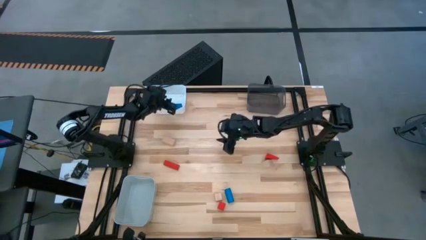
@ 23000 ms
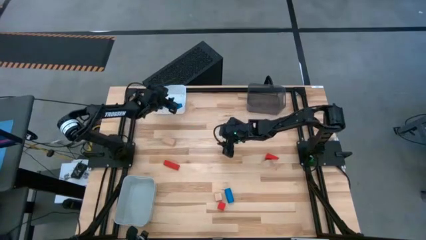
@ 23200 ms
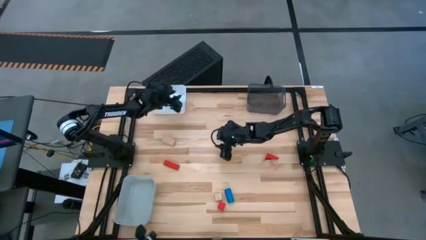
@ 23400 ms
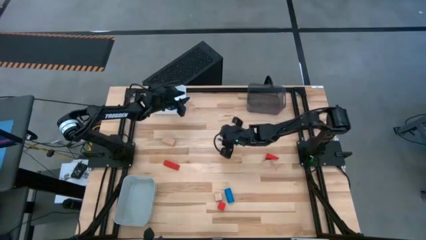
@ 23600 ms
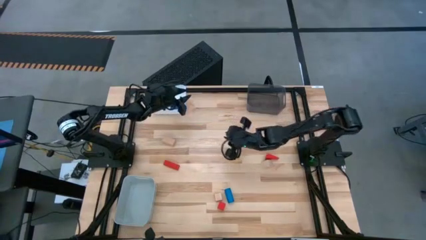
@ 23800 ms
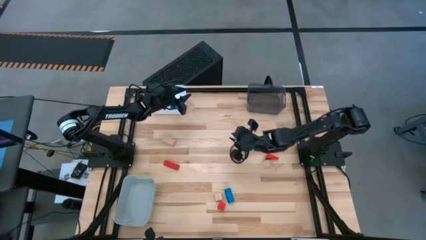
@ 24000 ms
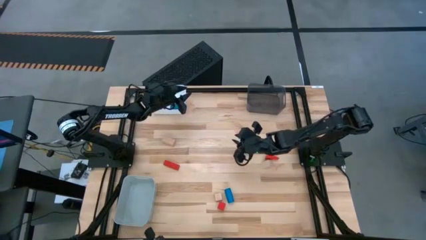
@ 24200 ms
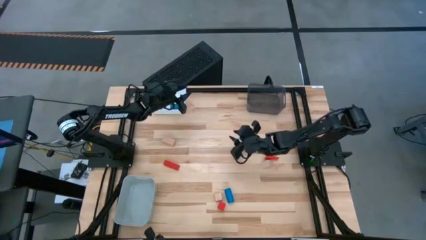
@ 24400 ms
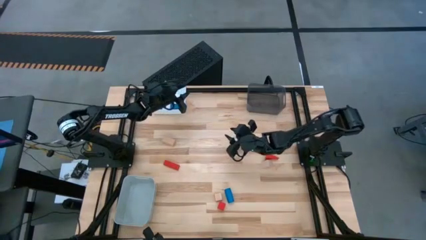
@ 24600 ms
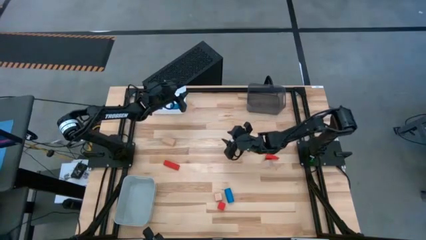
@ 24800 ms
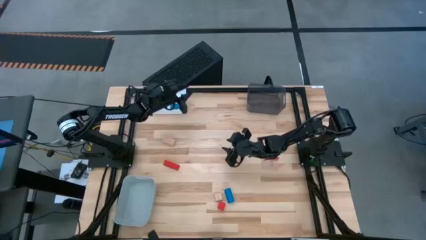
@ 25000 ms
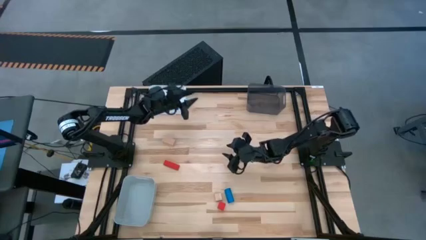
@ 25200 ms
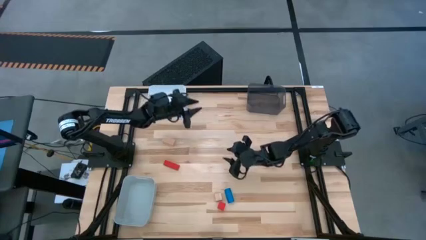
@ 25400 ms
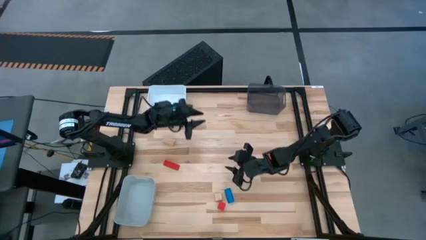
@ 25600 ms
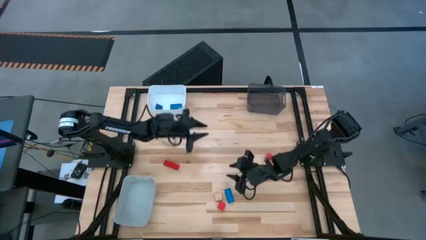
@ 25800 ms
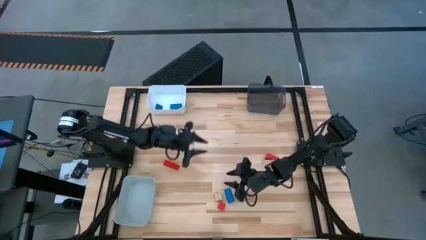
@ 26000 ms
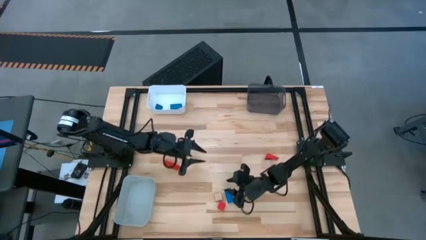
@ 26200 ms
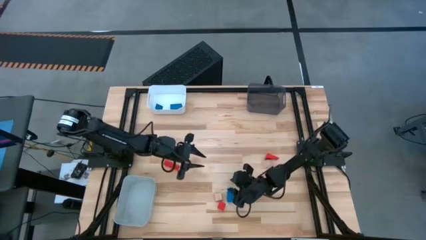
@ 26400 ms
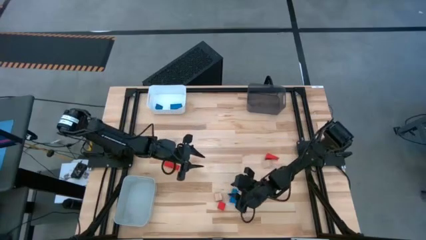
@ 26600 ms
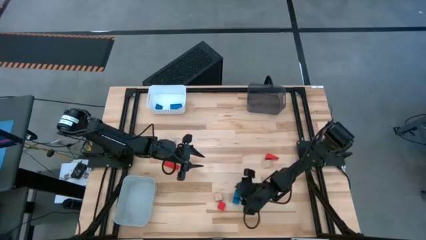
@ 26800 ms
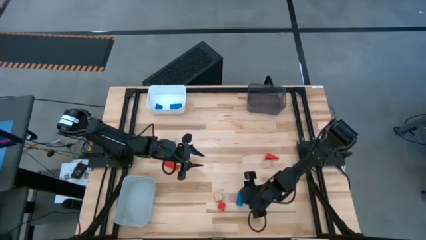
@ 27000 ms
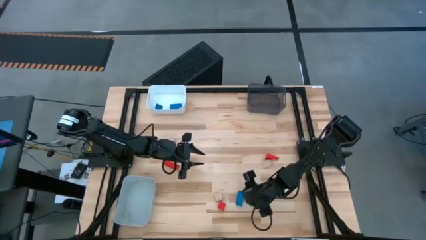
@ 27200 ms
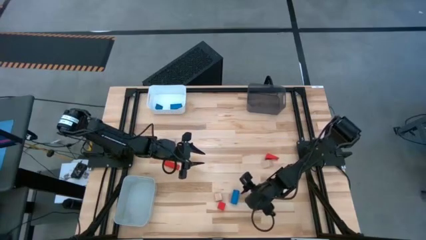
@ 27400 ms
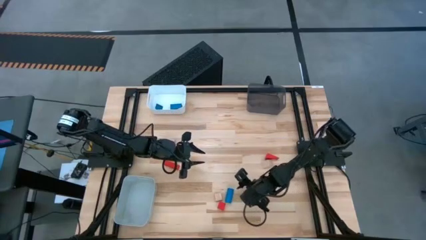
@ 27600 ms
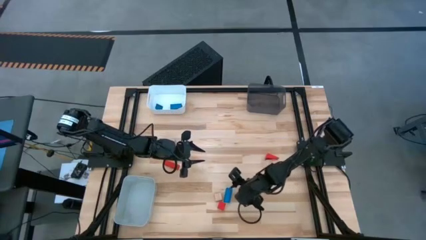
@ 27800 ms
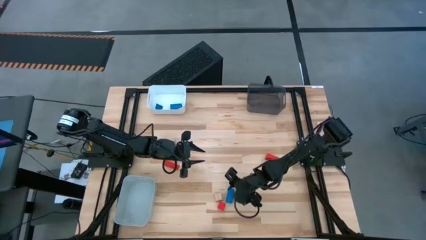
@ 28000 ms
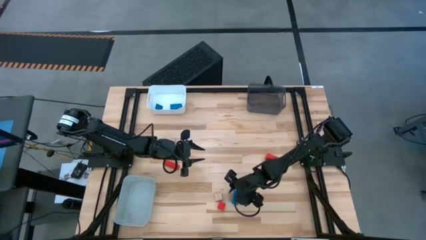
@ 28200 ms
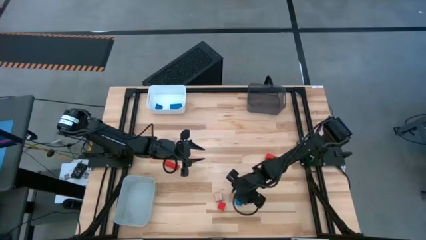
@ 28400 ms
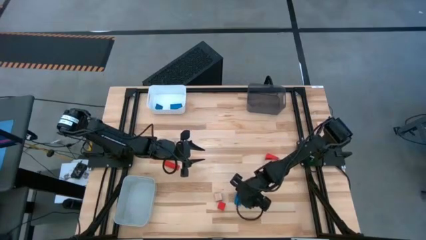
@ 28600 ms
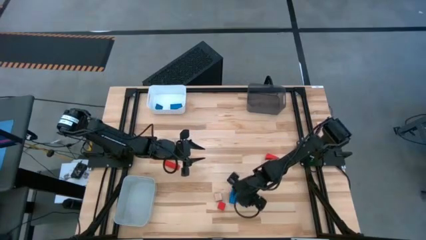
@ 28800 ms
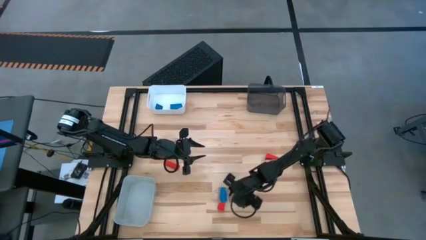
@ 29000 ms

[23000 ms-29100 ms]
Task: Sort & place blocks by color
Put the blue block into the white bin

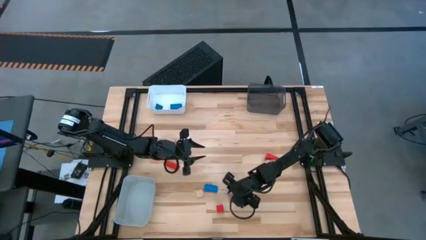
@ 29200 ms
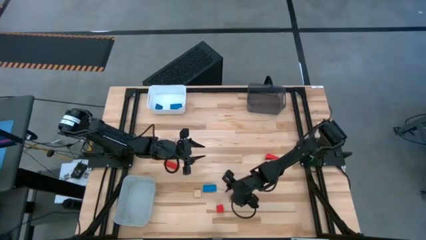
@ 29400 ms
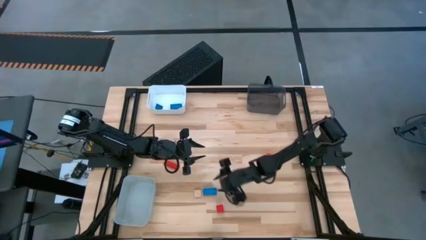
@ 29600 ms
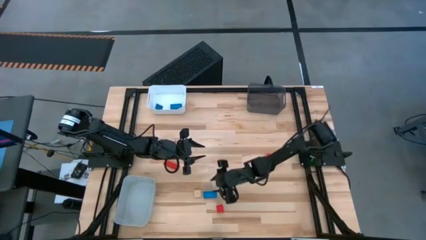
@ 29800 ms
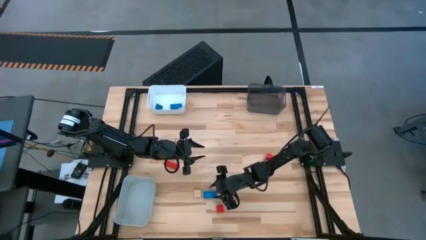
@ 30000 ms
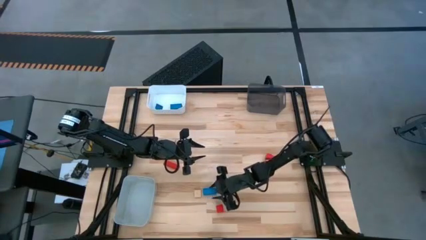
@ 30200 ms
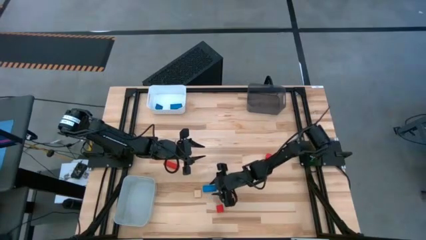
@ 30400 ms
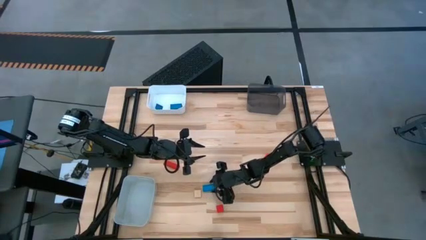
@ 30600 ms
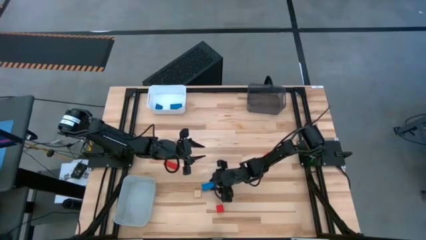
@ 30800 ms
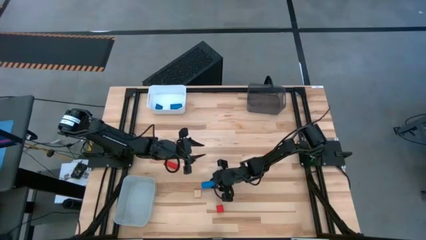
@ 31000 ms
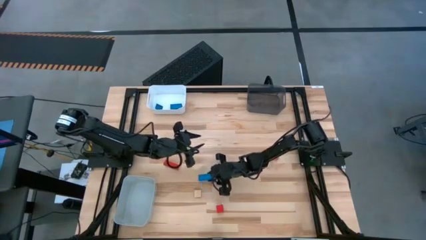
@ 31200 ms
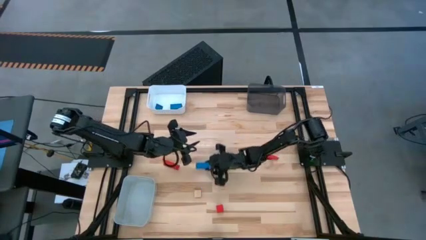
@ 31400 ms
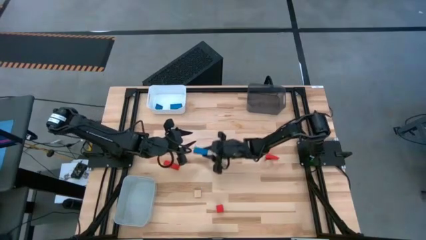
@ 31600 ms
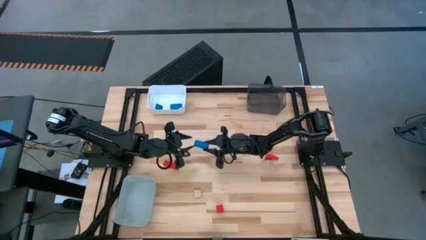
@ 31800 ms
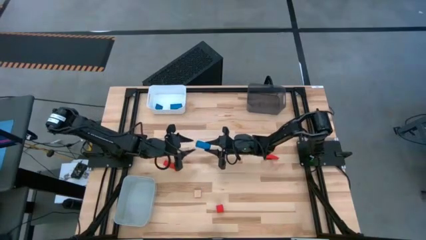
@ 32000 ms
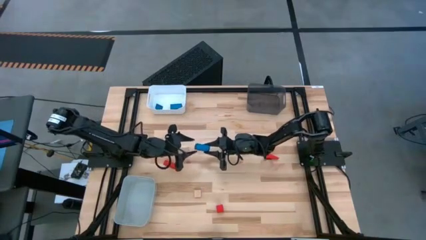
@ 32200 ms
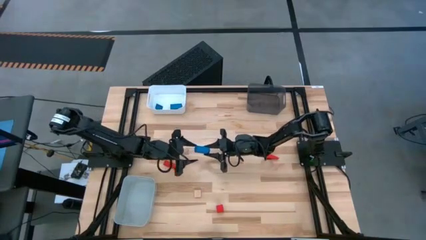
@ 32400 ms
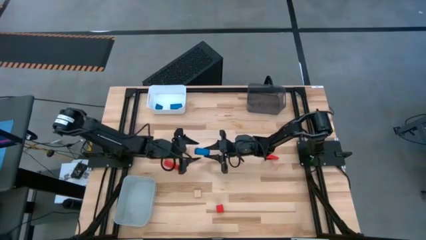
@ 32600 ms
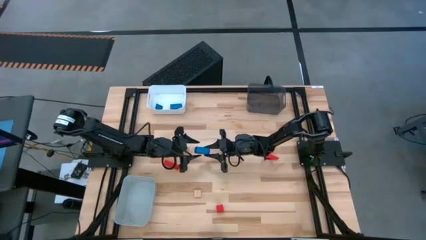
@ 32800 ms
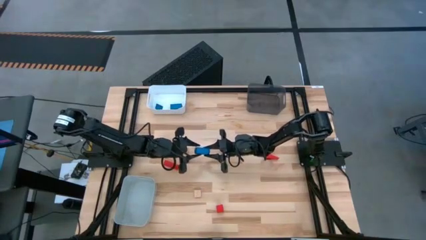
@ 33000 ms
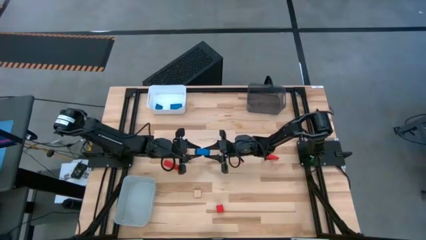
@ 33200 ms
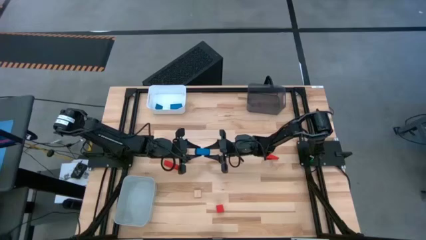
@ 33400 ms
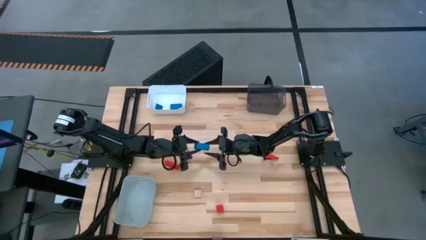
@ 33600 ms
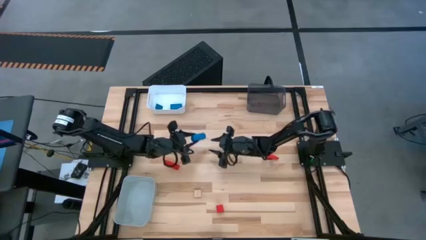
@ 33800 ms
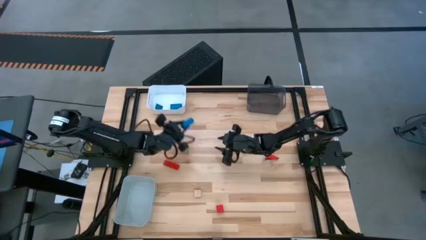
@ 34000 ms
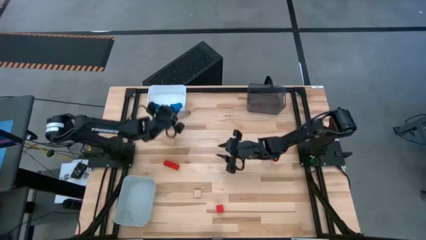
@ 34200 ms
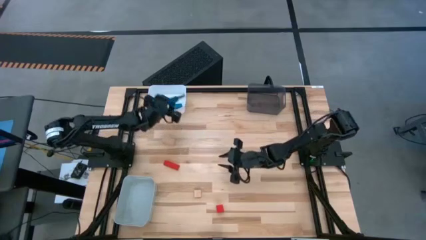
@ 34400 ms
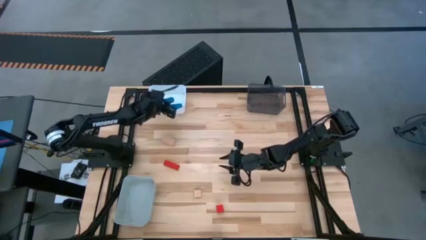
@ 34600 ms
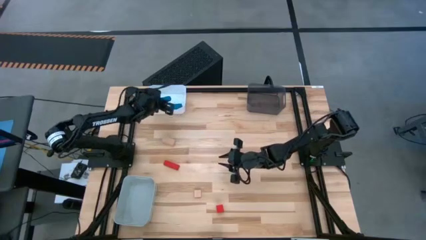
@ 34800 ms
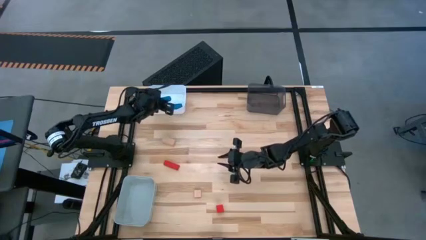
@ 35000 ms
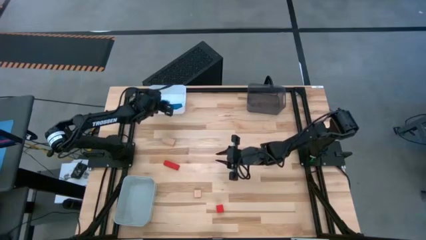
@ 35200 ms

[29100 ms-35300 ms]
Put the blue block into the white bin

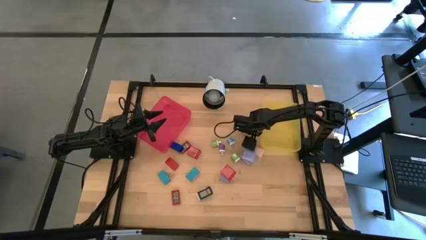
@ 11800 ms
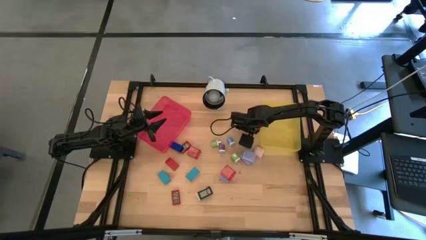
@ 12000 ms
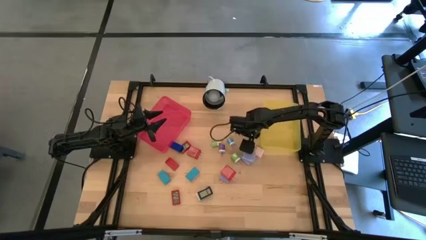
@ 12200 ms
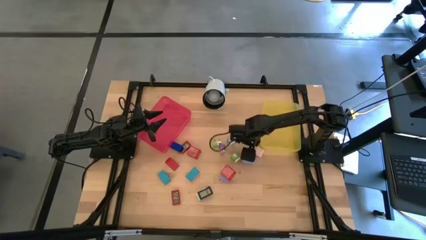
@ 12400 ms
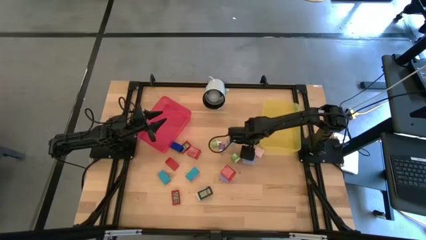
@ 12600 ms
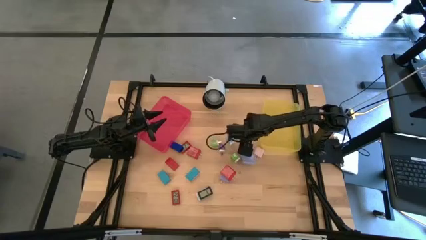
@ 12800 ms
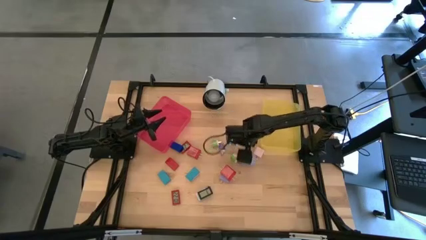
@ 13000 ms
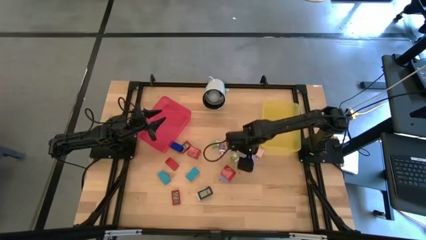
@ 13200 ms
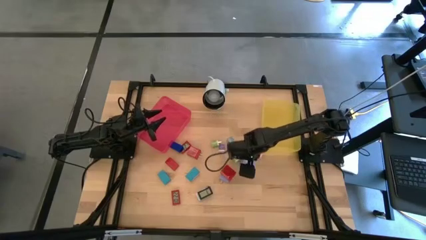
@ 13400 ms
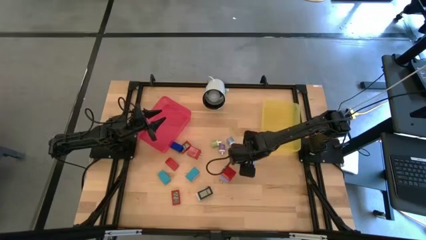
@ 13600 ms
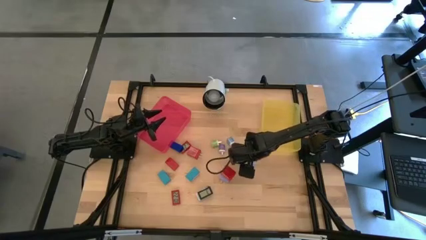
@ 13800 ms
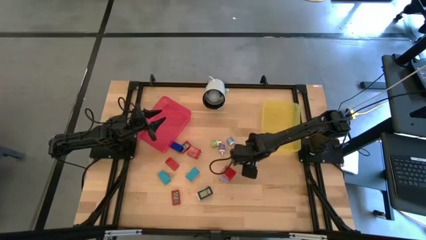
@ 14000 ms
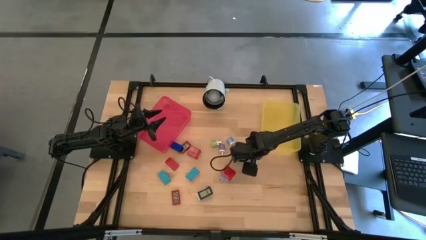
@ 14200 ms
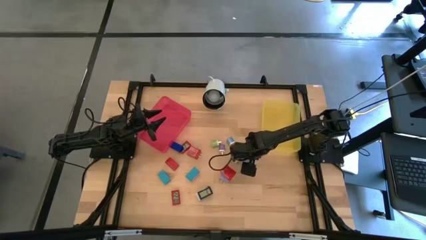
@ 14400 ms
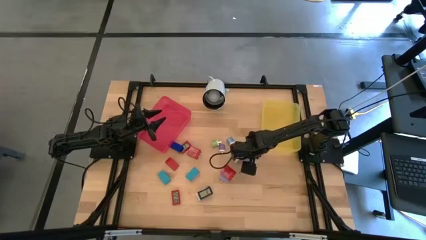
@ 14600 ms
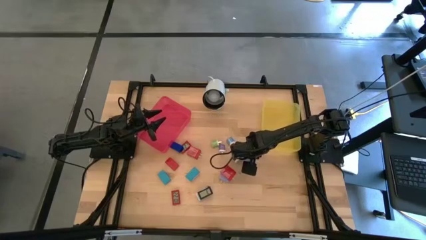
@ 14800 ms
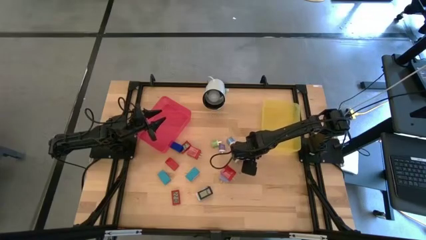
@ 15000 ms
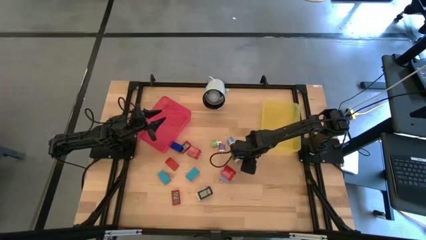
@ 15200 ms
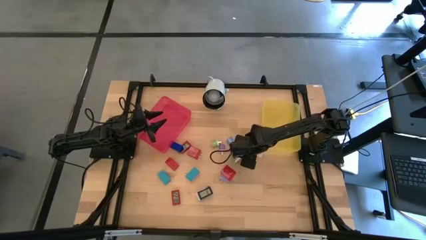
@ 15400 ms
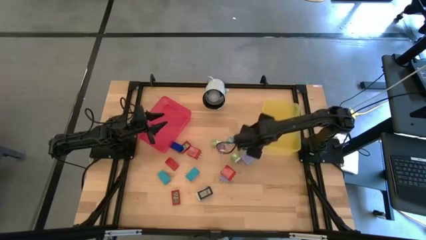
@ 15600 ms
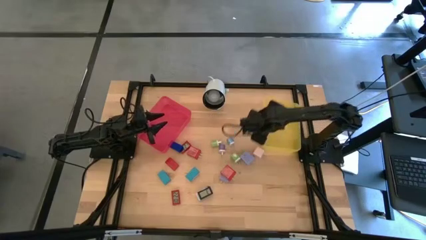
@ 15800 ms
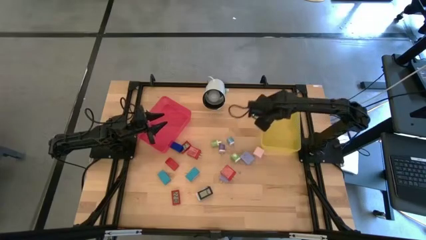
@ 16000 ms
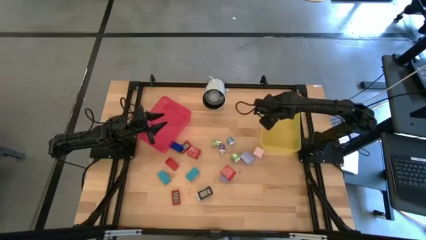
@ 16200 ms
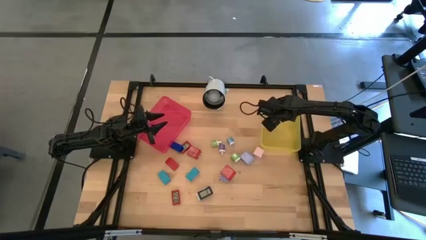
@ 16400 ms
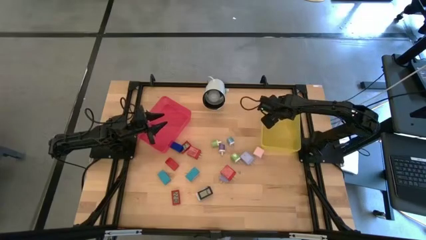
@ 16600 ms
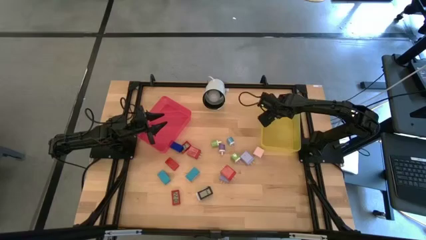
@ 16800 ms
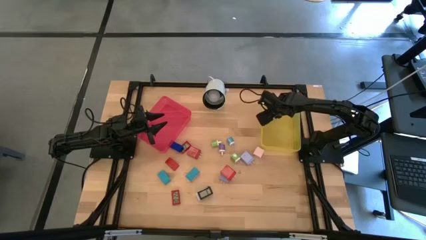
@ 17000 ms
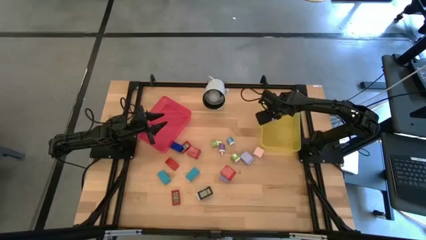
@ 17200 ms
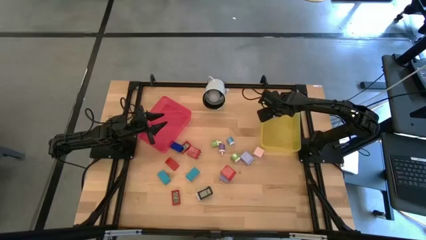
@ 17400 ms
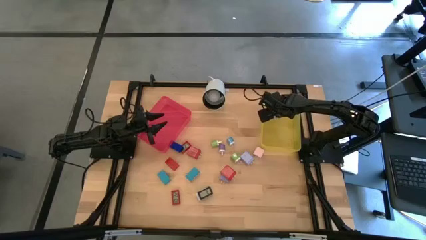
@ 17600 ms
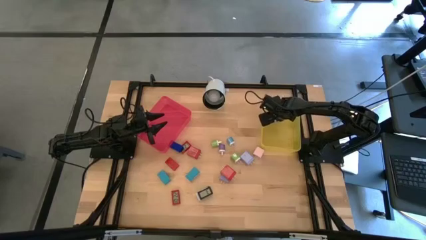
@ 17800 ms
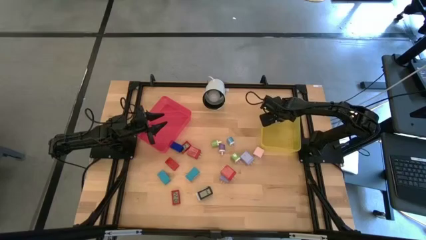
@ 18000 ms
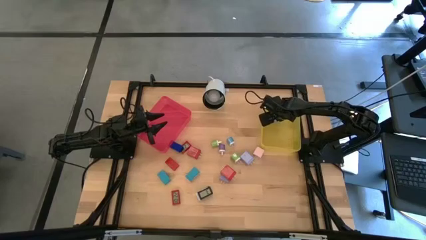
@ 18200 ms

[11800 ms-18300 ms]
Task: Pick & Place Office items
Put the blue charger adapter into the yellow bin
